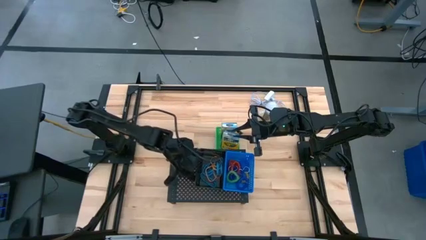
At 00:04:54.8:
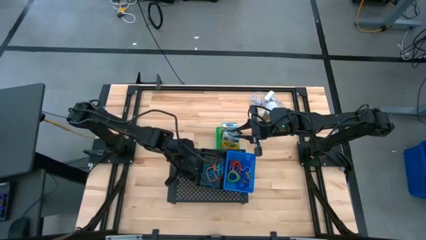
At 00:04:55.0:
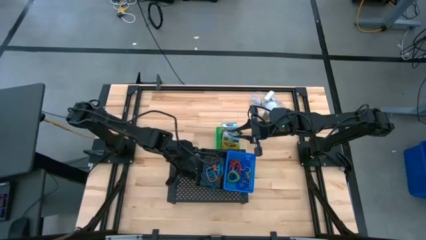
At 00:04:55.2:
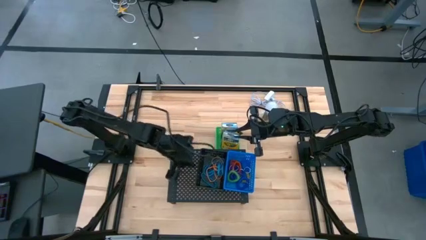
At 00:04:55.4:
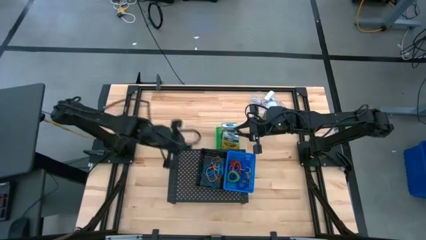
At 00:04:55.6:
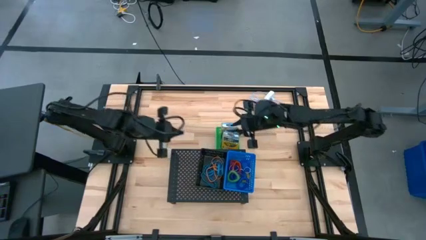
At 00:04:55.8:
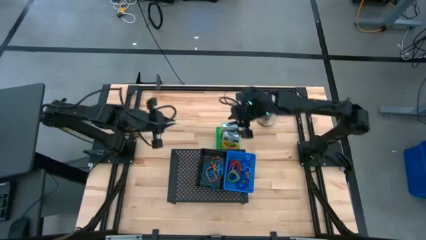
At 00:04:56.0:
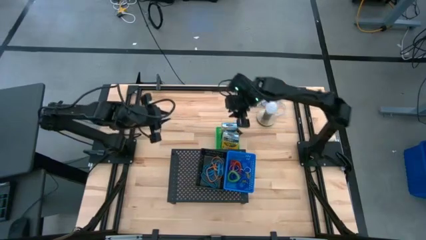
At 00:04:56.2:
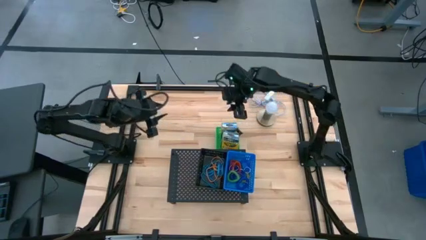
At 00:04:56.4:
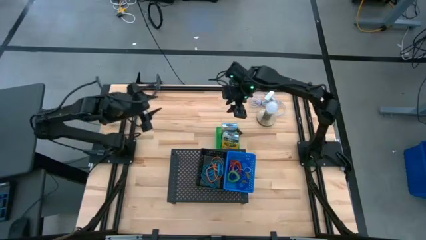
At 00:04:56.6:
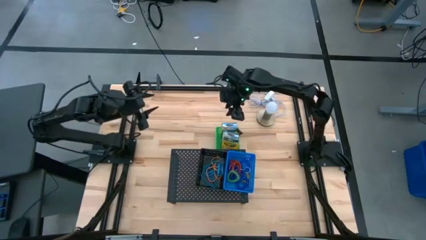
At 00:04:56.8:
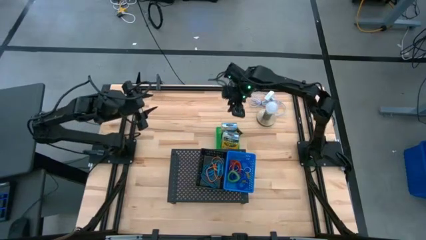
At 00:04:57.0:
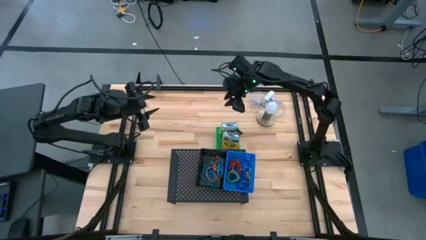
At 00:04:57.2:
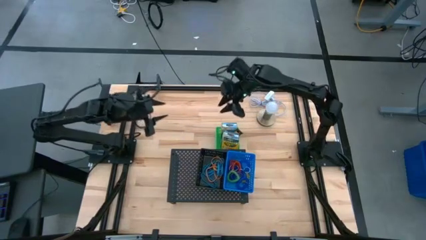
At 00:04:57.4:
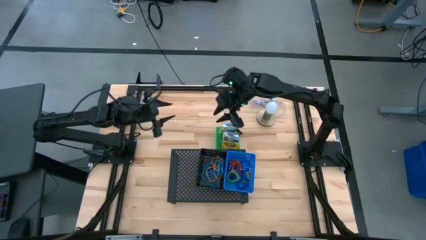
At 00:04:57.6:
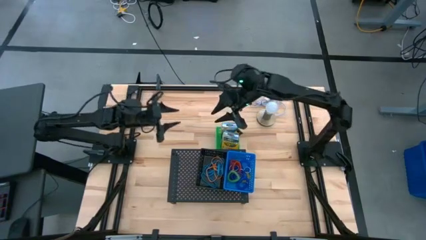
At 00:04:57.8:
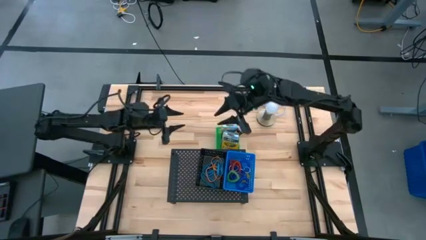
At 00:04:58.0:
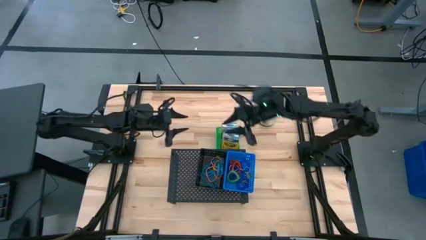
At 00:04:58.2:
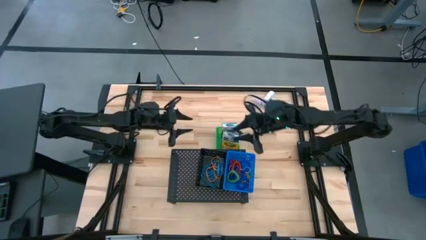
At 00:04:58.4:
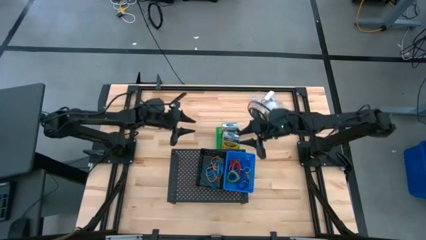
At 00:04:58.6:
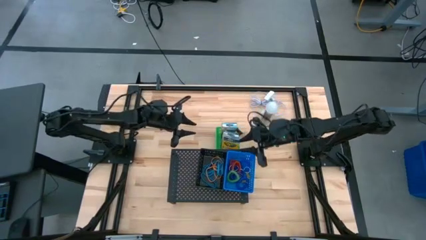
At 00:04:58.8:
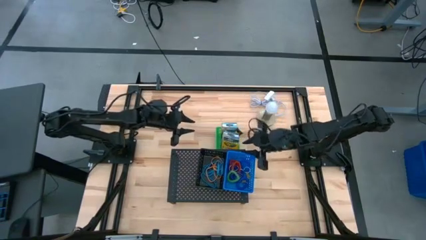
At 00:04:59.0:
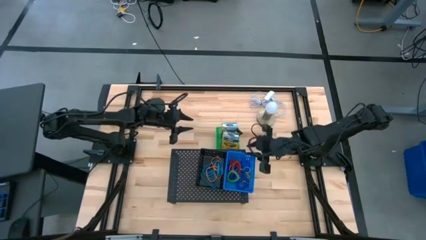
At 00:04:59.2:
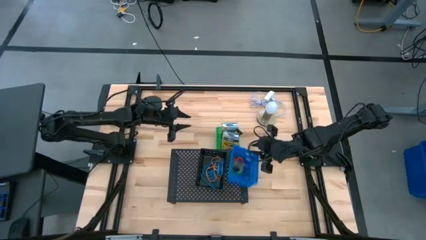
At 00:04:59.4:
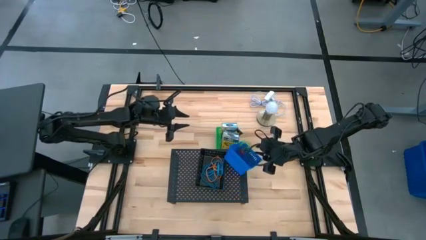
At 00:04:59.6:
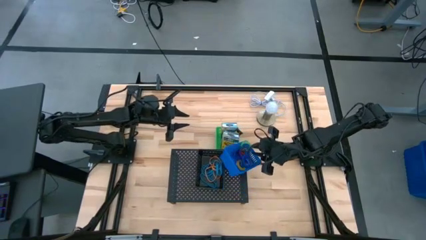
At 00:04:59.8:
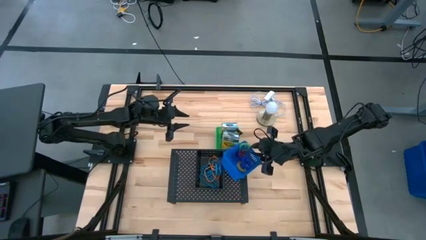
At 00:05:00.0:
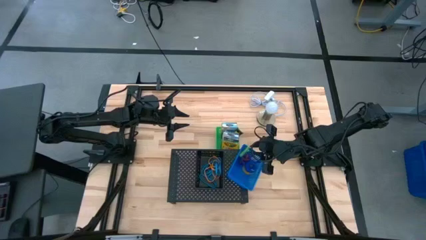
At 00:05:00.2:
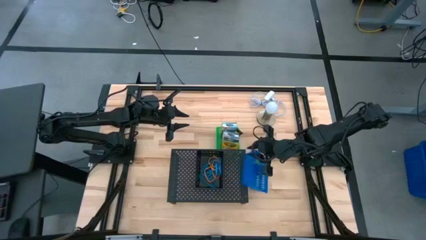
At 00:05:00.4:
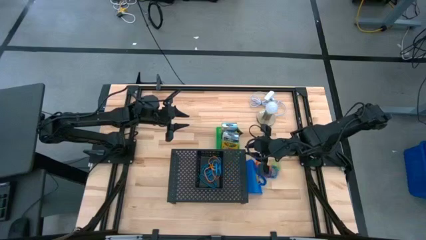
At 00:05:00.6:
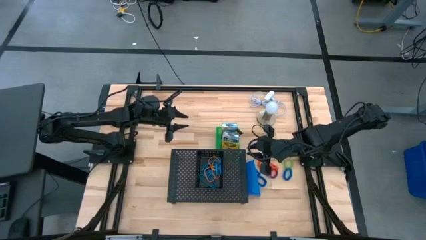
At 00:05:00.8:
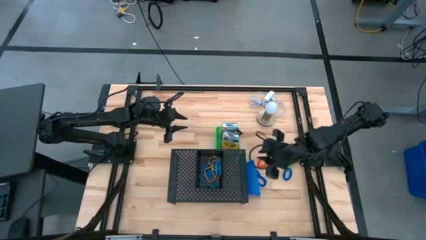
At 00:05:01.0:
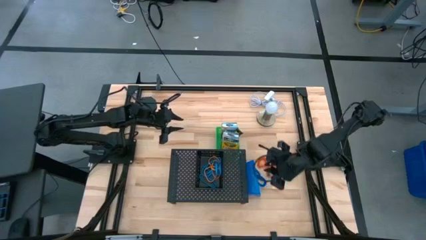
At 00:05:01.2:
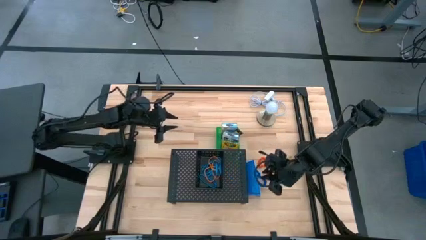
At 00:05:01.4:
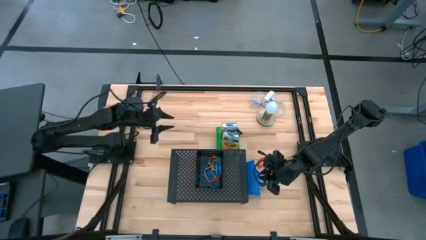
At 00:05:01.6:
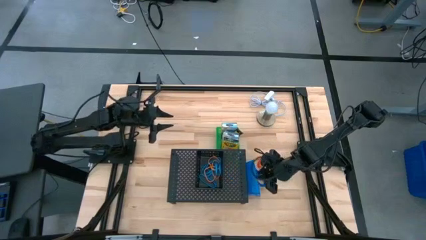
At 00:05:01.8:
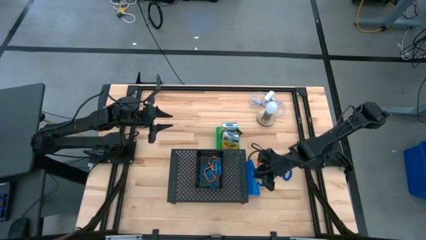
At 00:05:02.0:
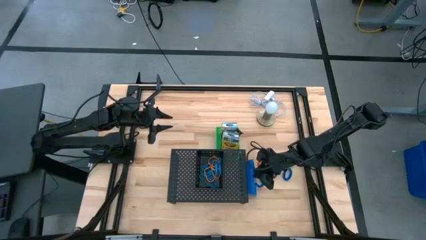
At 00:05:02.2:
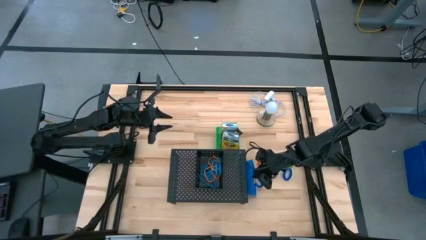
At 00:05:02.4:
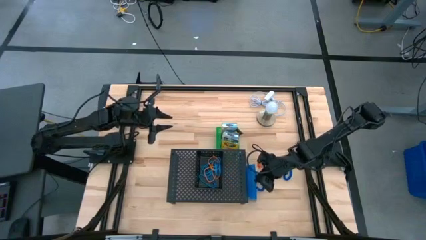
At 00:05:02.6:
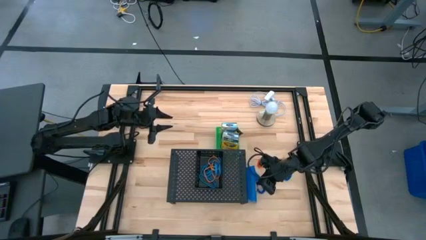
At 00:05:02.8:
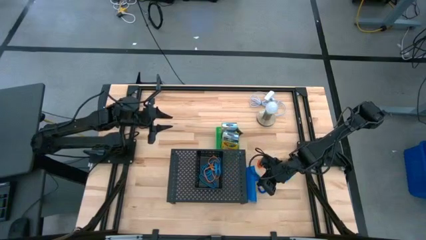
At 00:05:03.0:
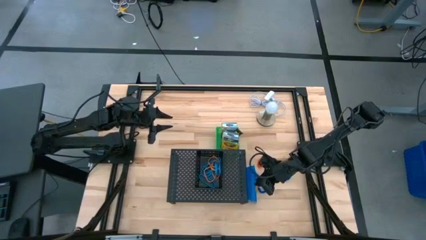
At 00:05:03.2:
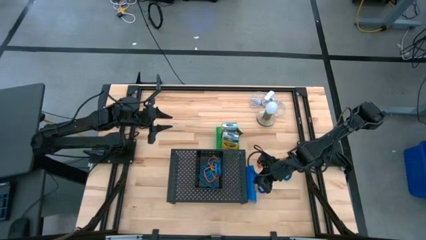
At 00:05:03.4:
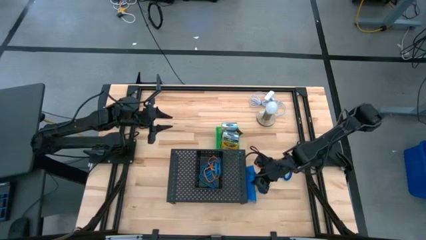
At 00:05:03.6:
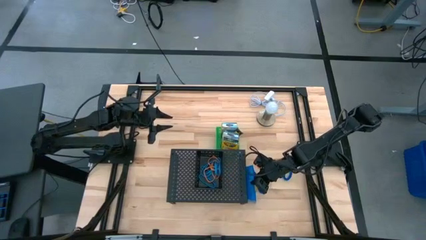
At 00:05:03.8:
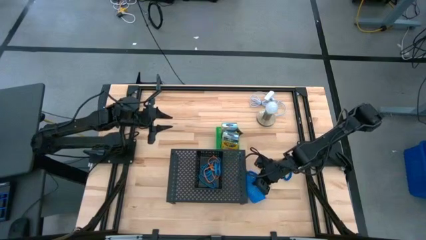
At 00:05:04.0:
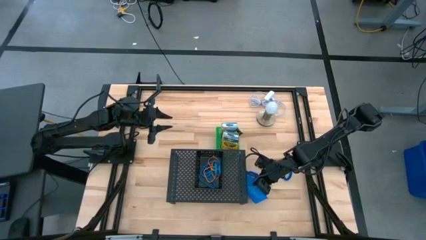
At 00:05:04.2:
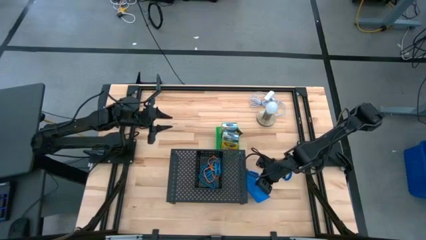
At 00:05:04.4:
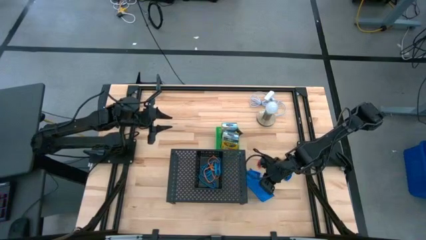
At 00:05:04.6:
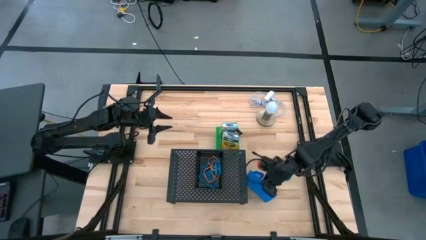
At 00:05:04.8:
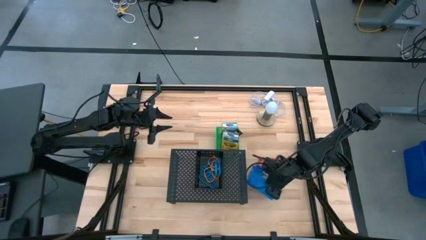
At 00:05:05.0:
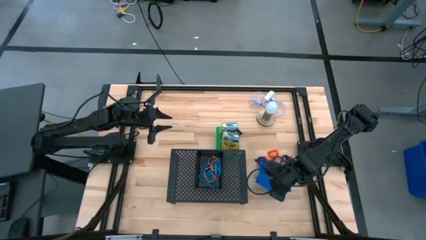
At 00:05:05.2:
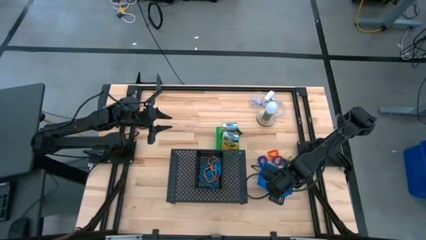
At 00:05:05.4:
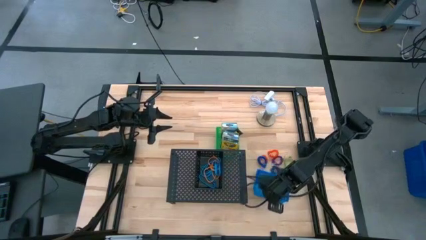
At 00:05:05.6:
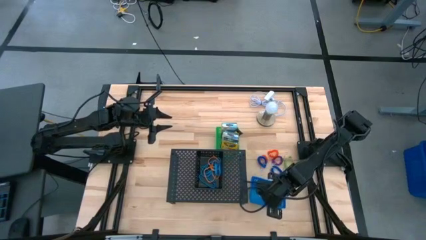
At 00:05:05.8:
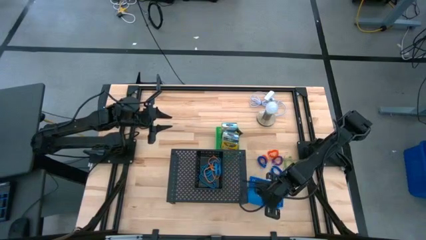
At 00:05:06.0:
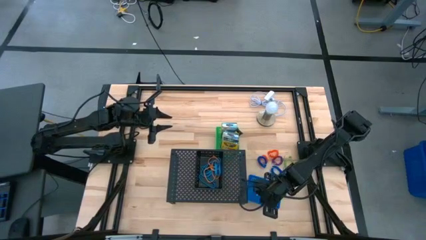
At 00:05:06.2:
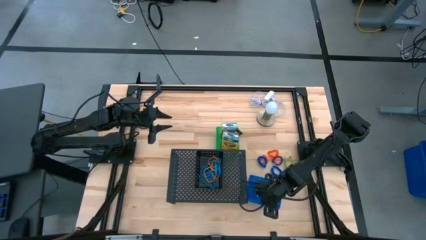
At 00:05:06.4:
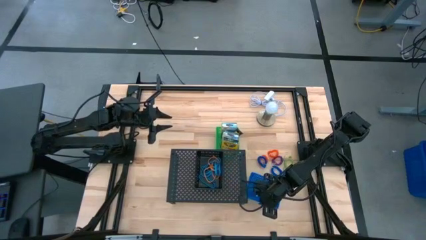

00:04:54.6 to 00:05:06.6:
Task: Pick & Place Office Desk Supplies
Adjust the blue bin on the table

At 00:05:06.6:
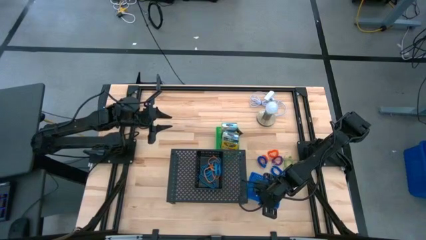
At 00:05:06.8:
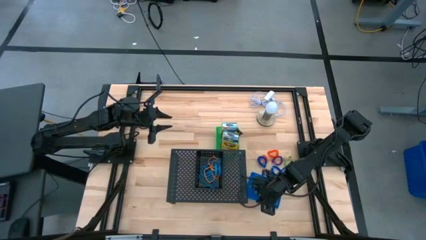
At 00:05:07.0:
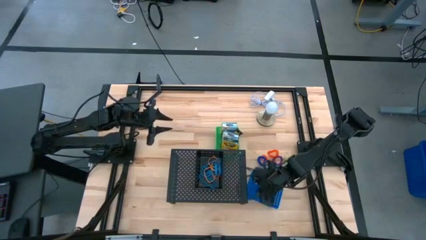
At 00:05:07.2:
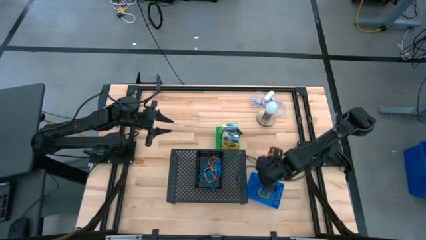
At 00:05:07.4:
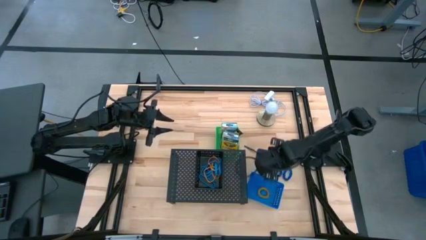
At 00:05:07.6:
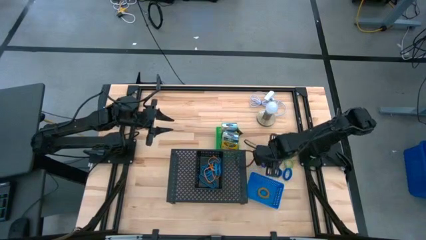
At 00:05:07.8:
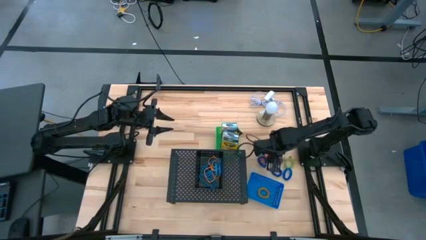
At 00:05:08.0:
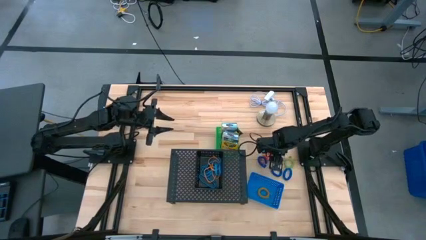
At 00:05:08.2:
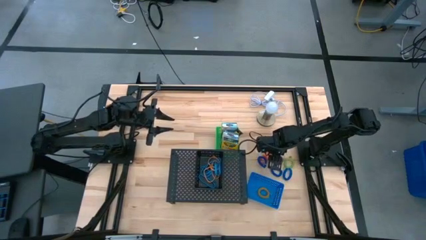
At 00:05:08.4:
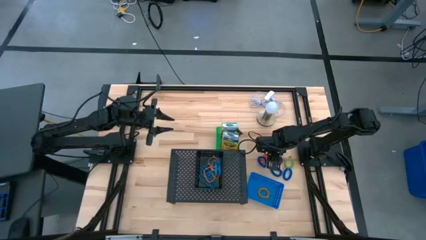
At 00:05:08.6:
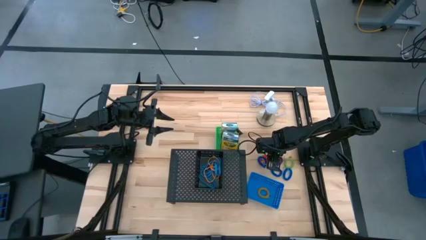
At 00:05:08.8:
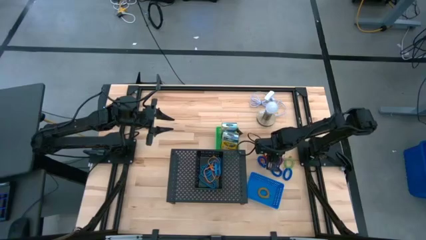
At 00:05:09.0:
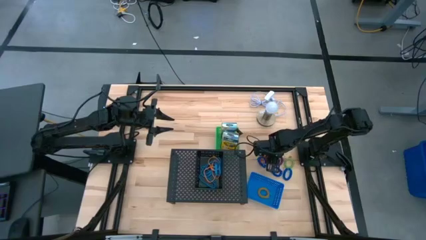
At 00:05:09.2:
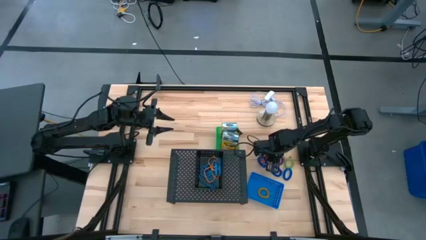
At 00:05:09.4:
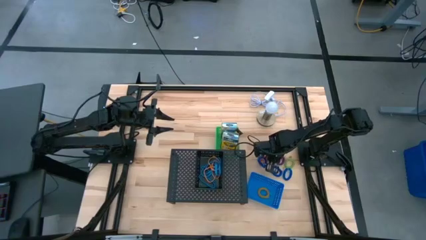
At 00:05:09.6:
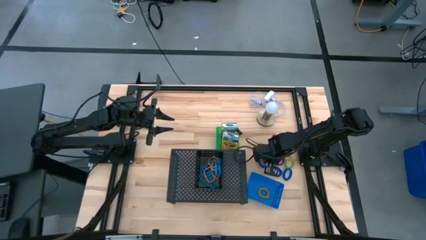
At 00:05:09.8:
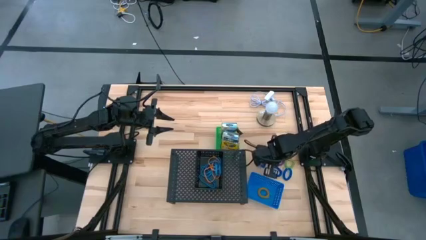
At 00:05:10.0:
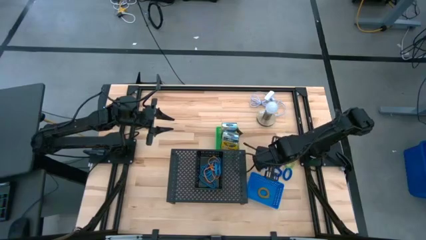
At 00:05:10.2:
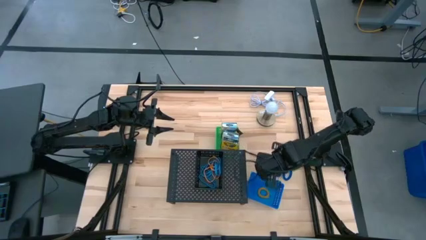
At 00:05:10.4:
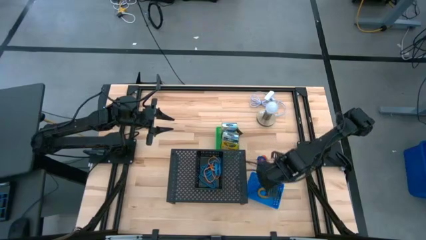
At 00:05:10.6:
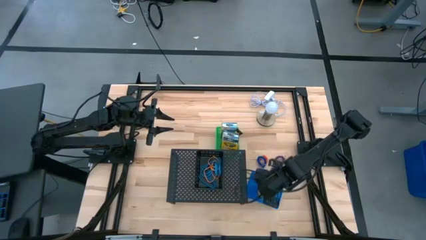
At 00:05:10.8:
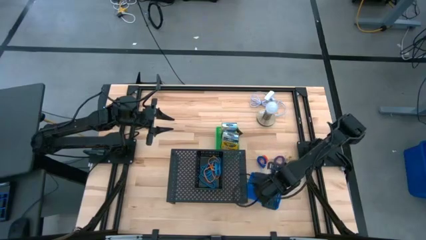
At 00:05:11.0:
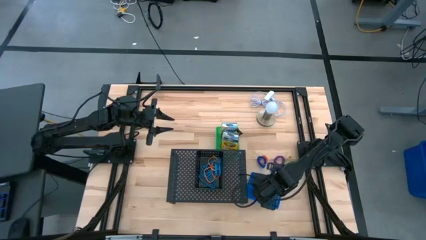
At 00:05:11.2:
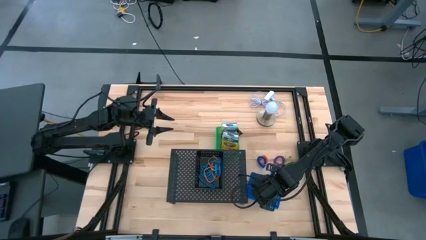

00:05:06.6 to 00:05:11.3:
Put the bottom orange spring keychain into the blue bin
